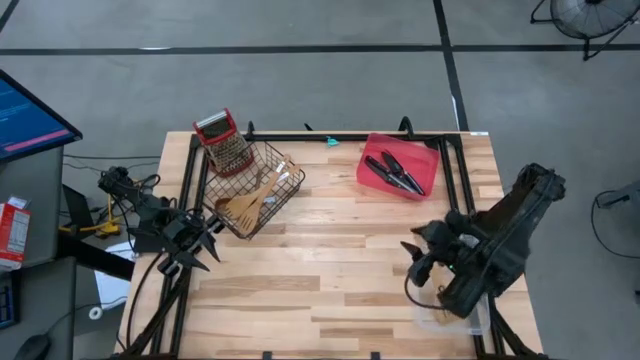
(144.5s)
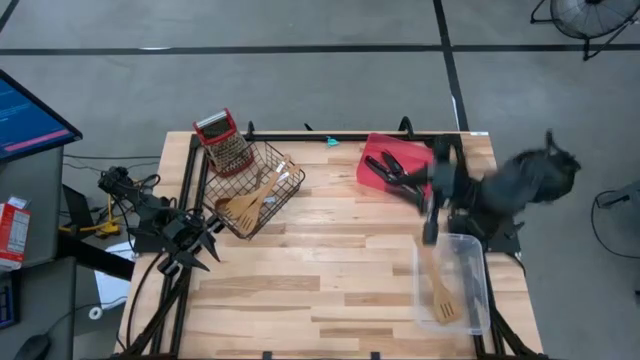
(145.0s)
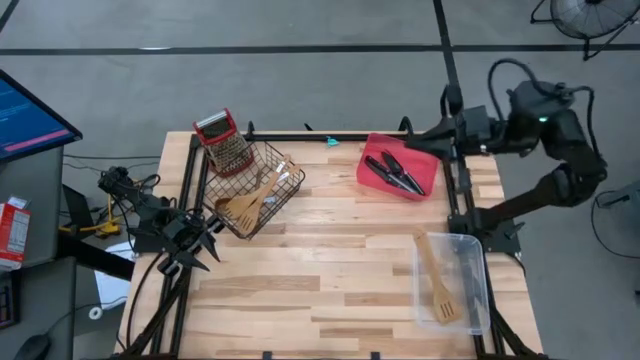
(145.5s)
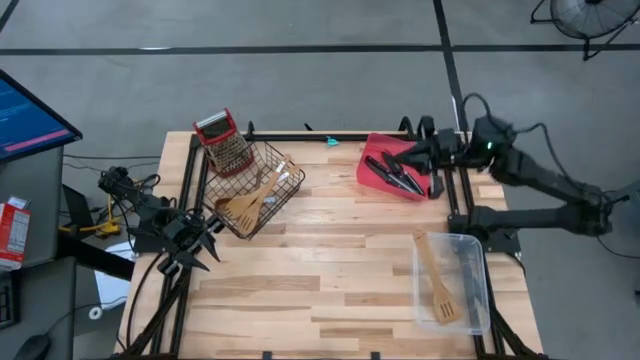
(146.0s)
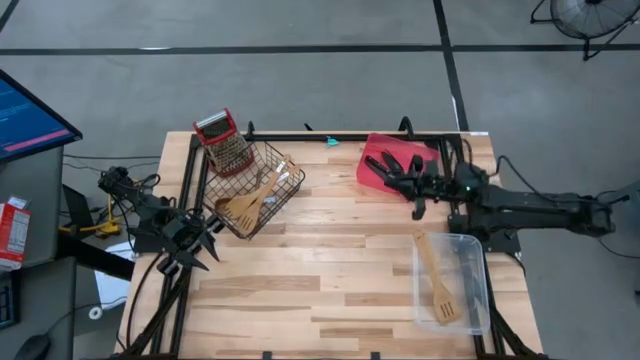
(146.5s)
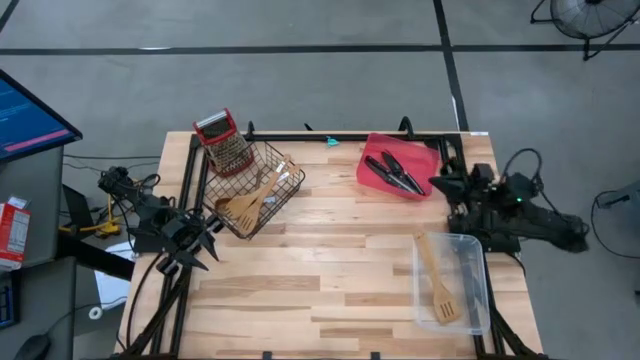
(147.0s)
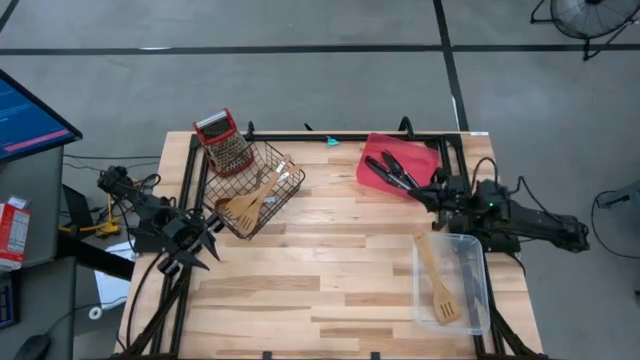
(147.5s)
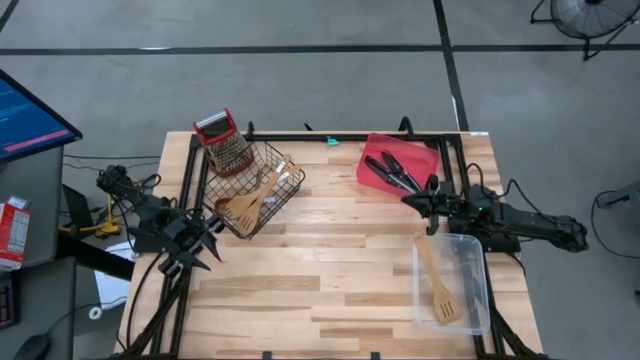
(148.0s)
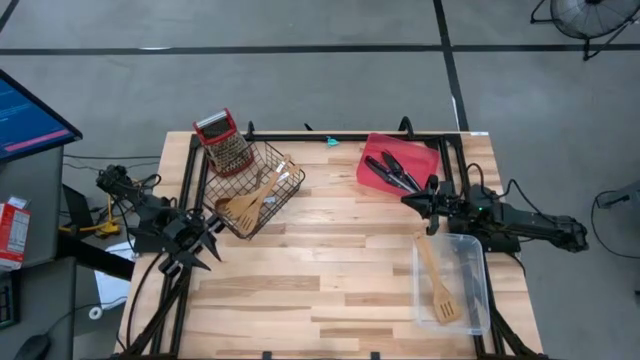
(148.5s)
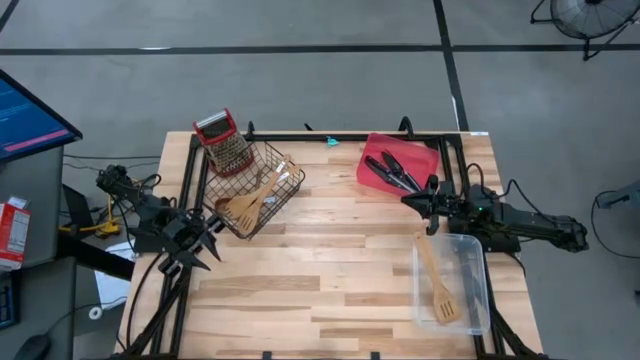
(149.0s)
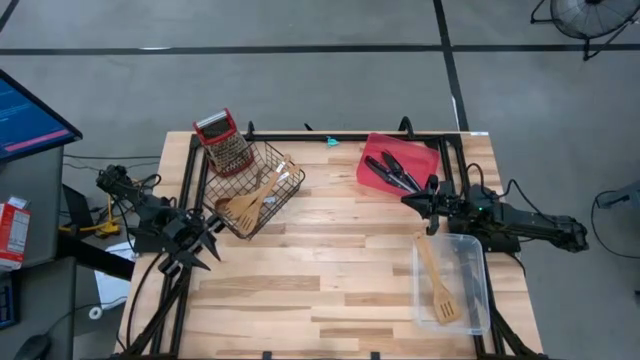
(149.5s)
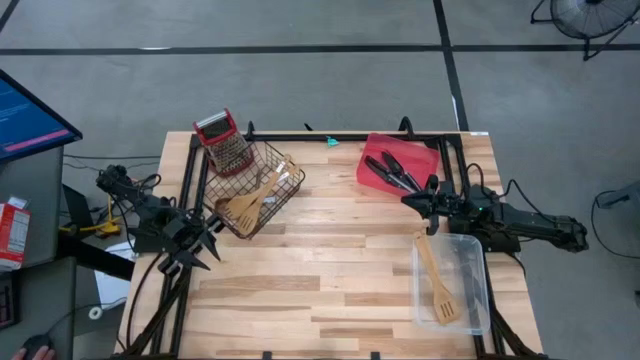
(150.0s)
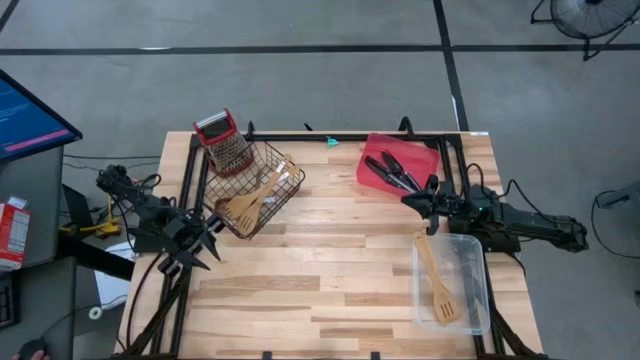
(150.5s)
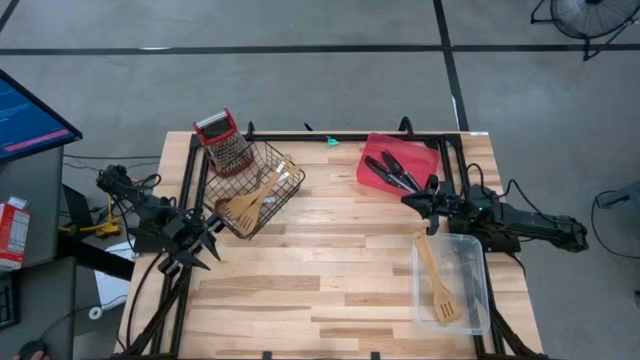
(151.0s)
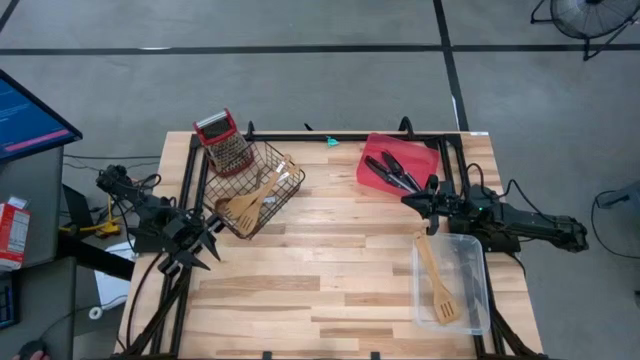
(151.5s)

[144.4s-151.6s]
Task: Pick & Place Kitchen Items
Return to Home Position

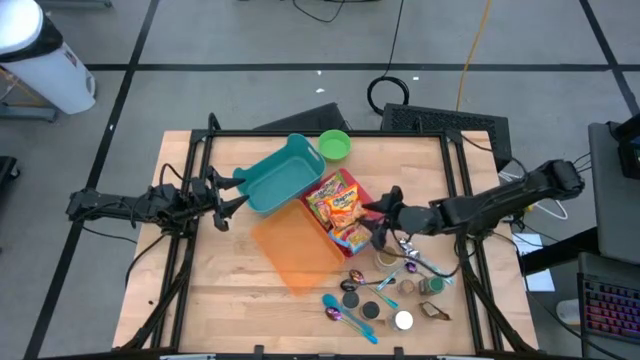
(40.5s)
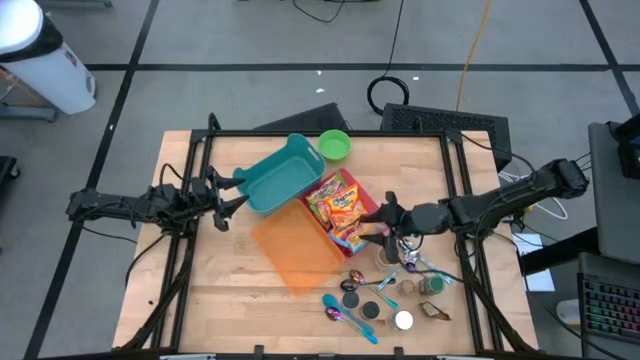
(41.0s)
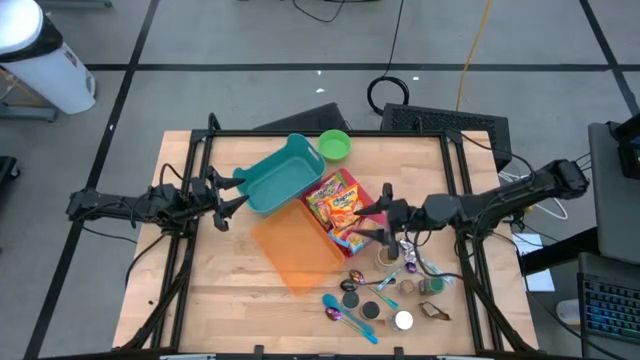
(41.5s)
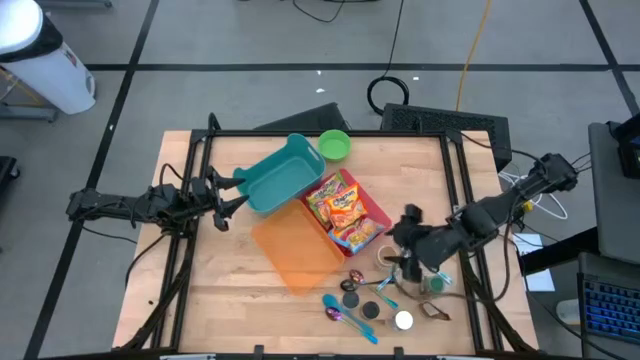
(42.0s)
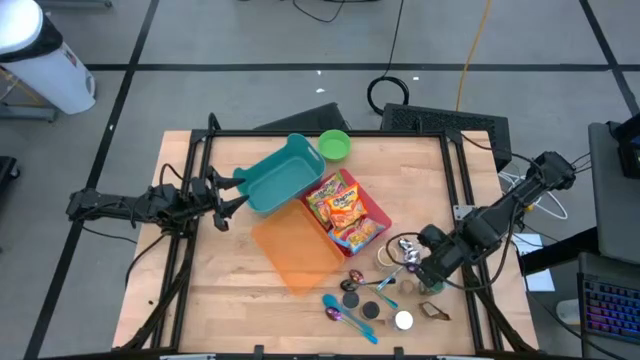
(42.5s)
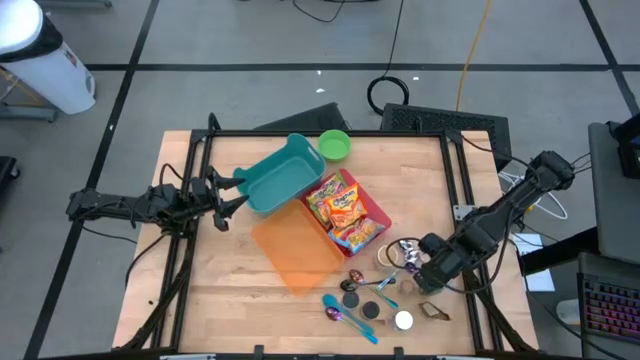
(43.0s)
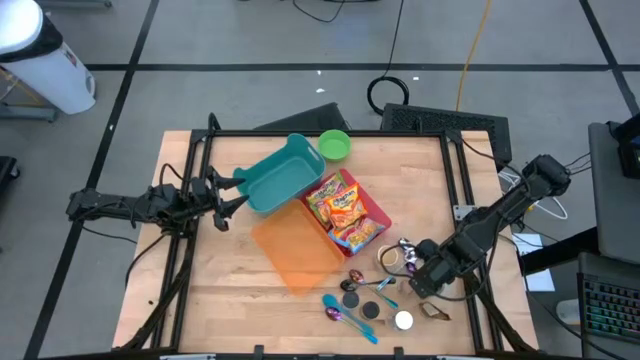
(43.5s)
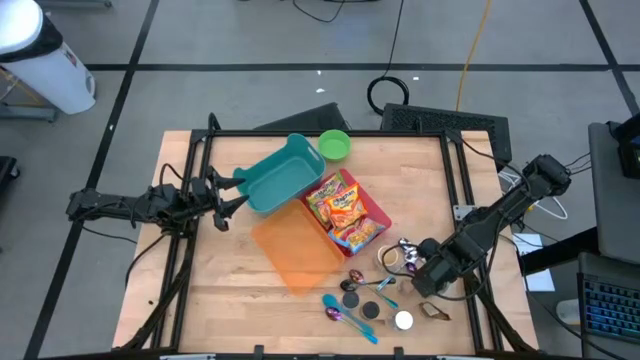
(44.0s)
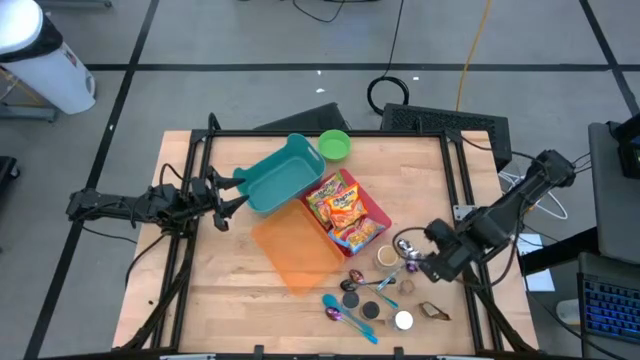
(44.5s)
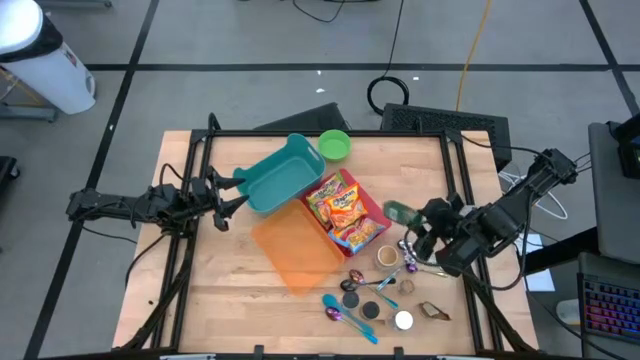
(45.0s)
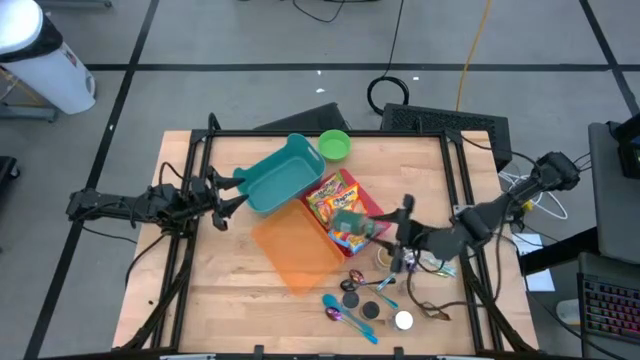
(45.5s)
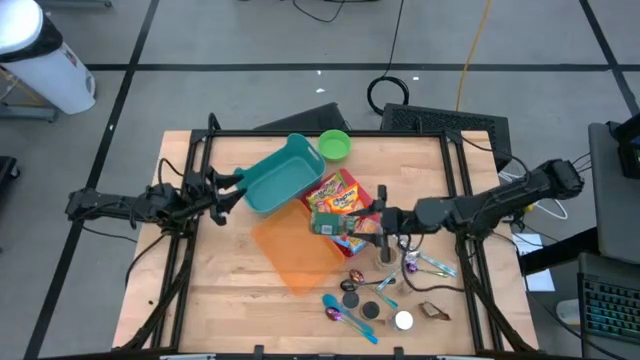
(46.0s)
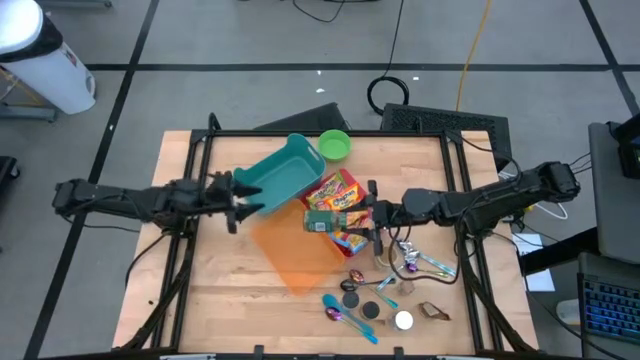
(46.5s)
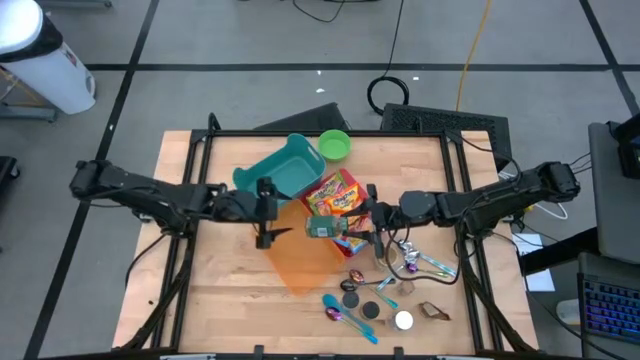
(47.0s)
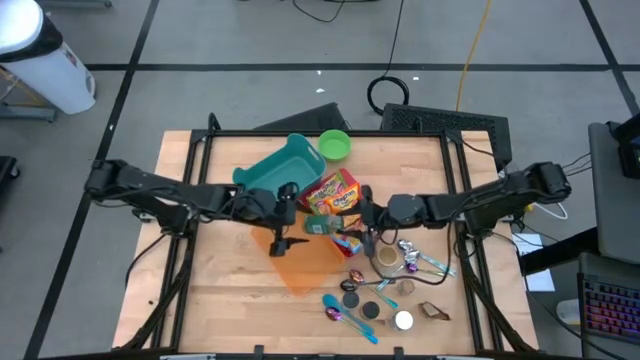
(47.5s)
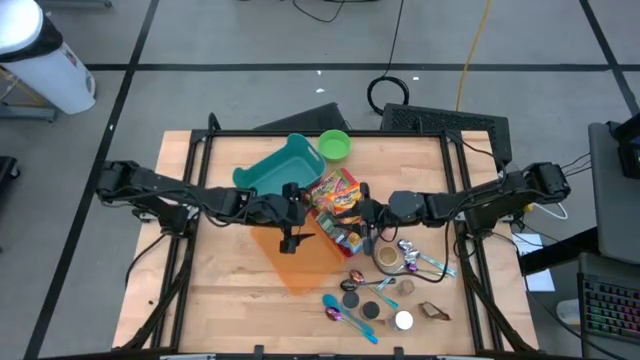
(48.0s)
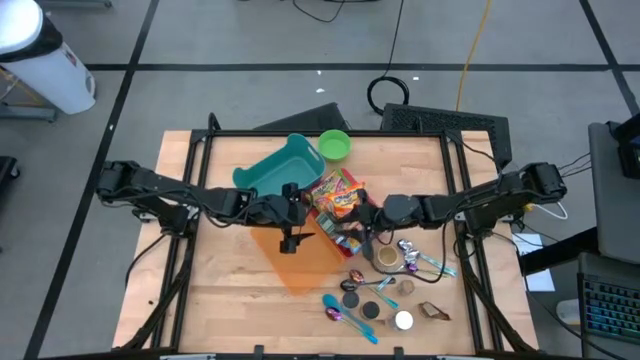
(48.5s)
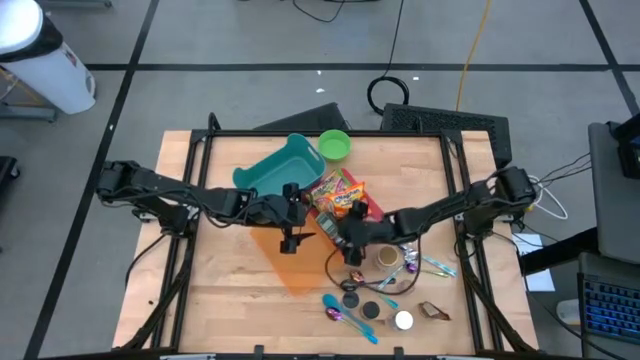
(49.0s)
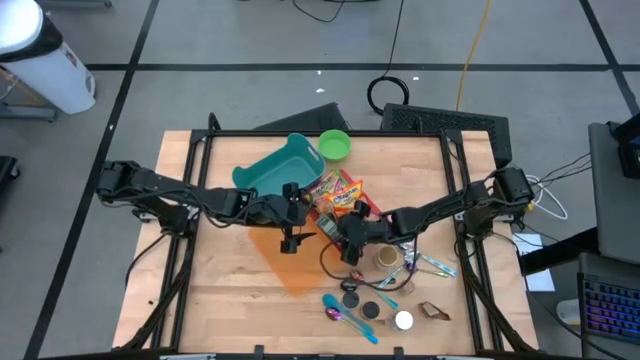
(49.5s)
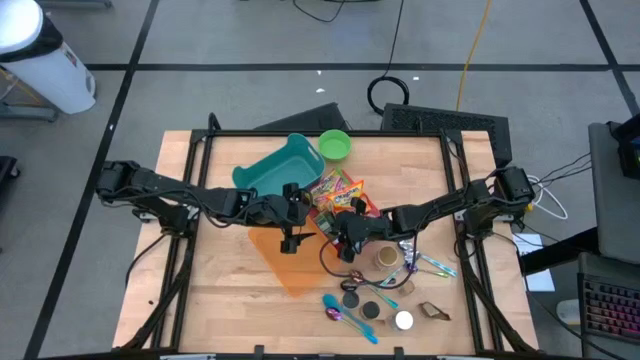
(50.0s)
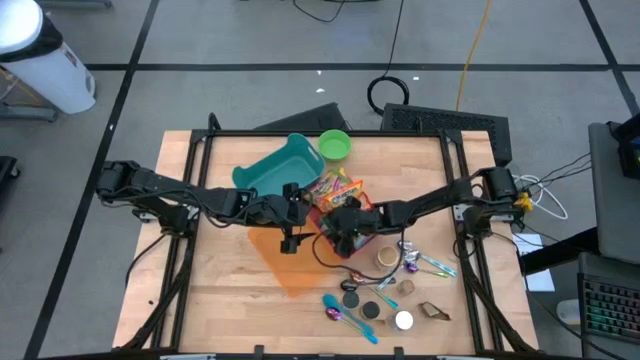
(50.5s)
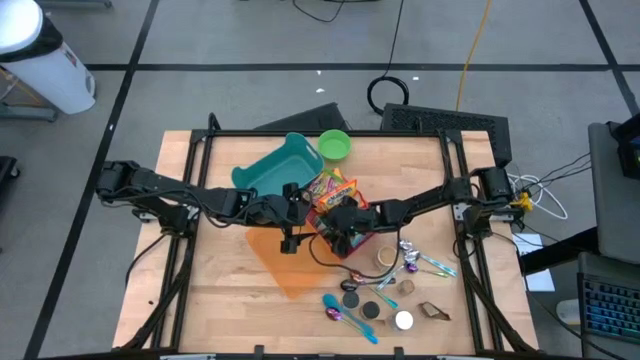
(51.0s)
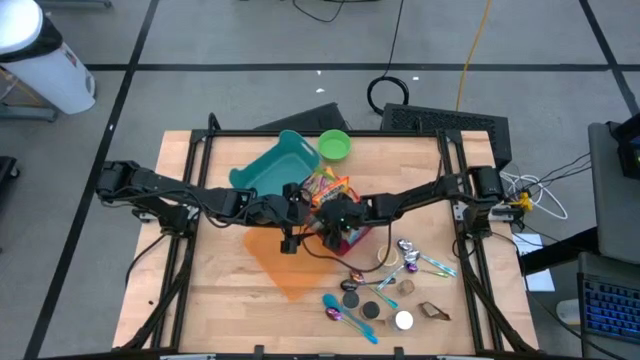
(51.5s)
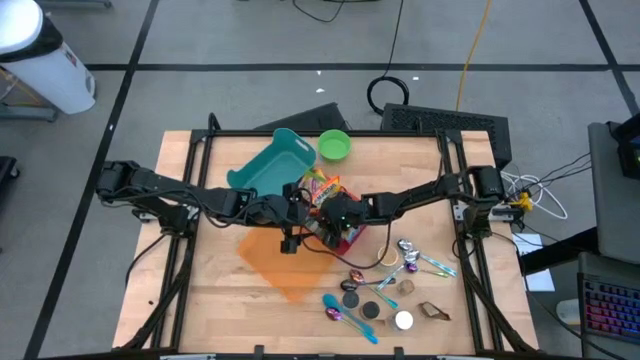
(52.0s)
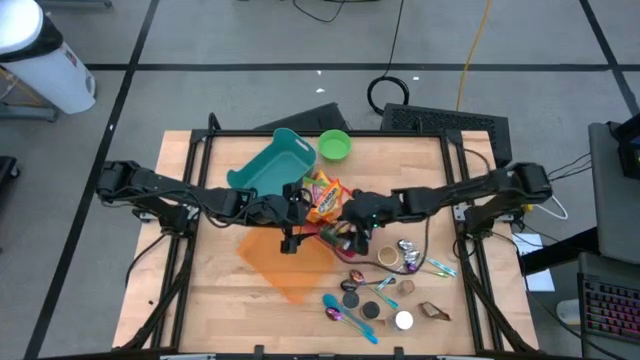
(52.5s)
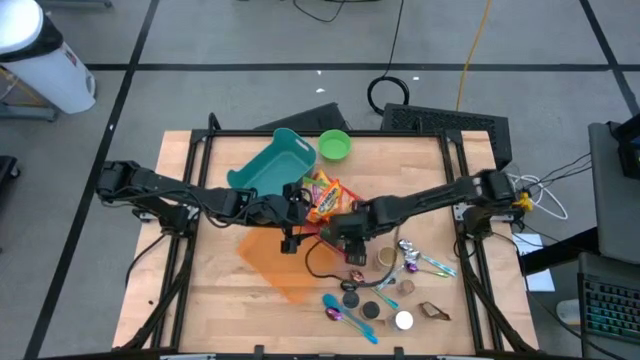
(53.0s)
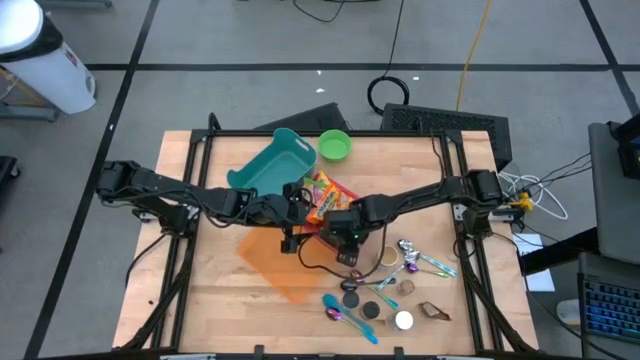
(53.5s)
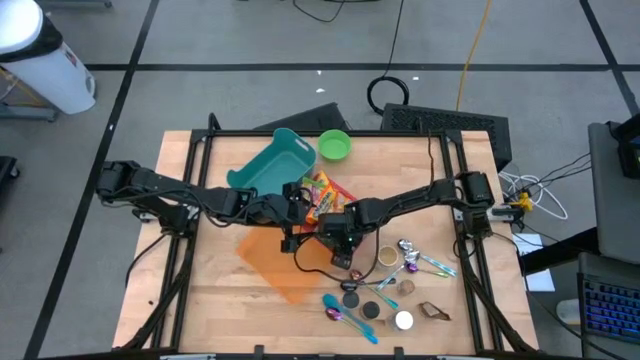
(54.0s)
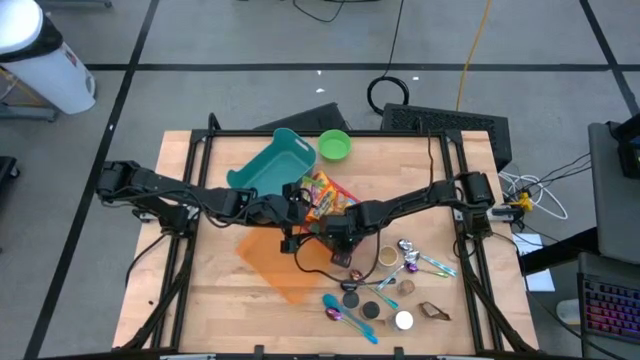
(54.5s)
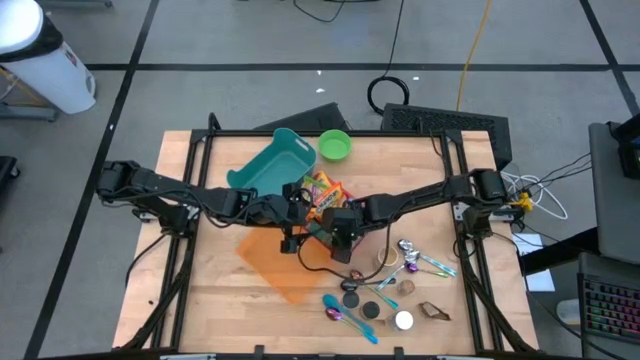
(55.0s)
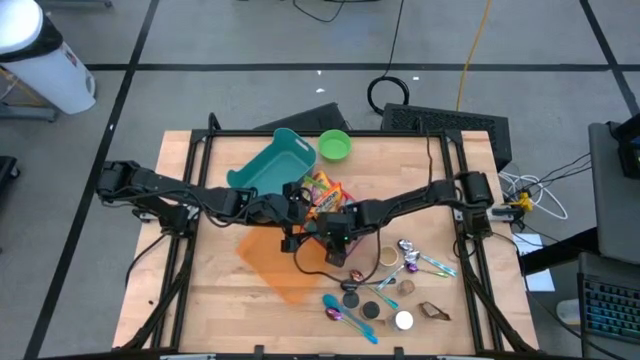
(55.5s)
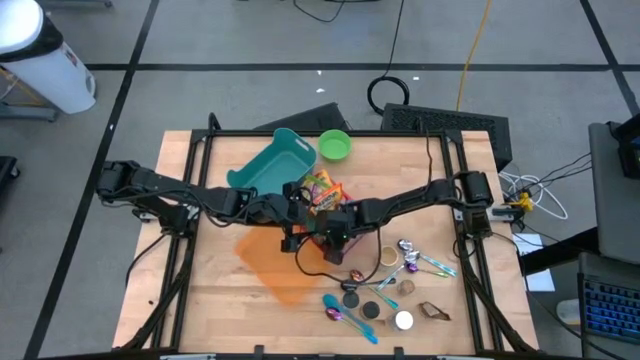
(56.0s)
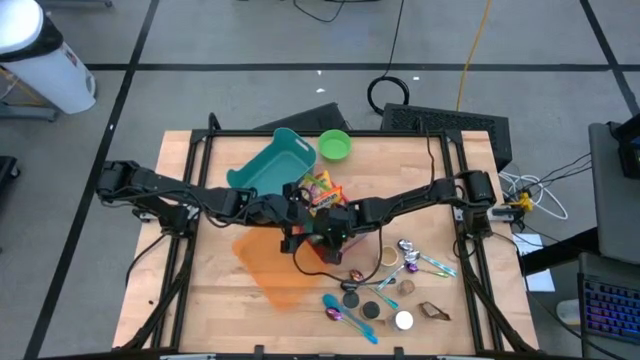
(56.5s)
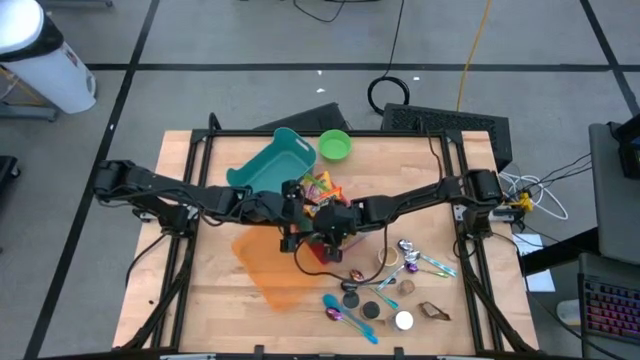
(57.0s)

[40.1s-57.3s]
Task: Pick & Place Food Item
Put the green seasoning bottle into the green bin
